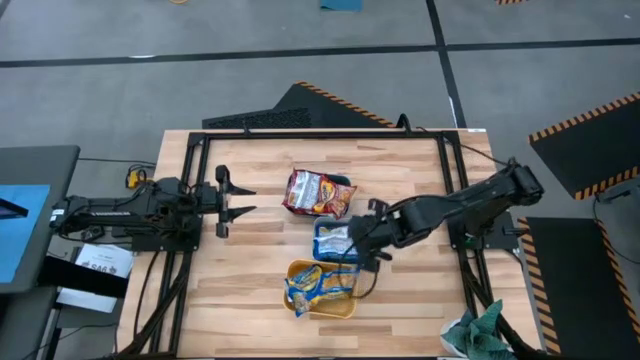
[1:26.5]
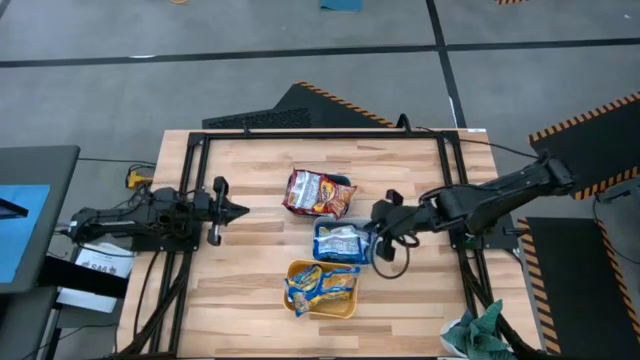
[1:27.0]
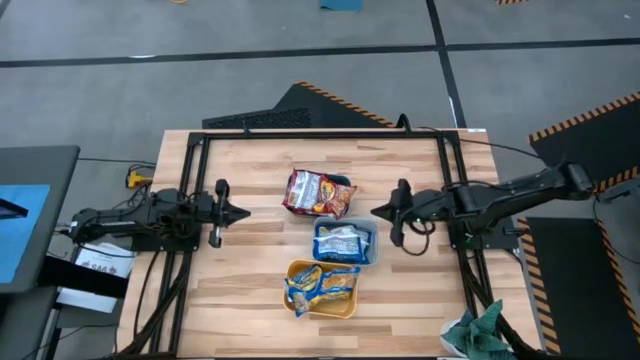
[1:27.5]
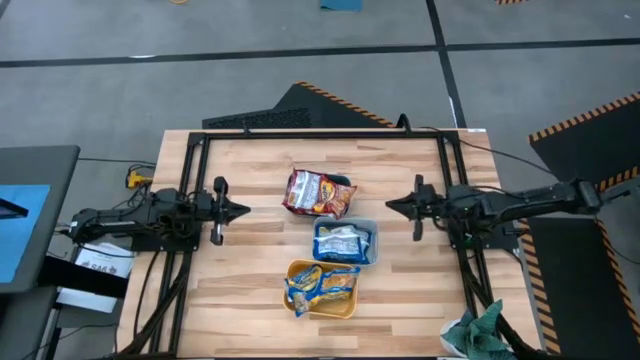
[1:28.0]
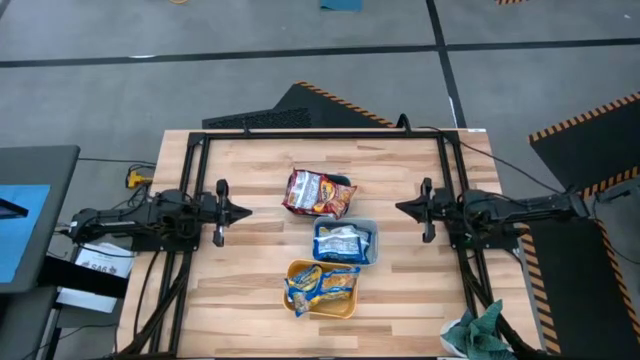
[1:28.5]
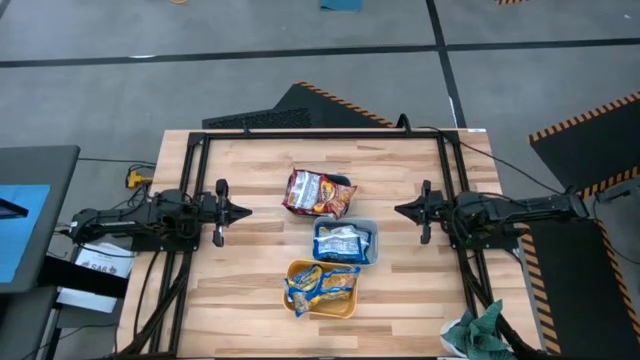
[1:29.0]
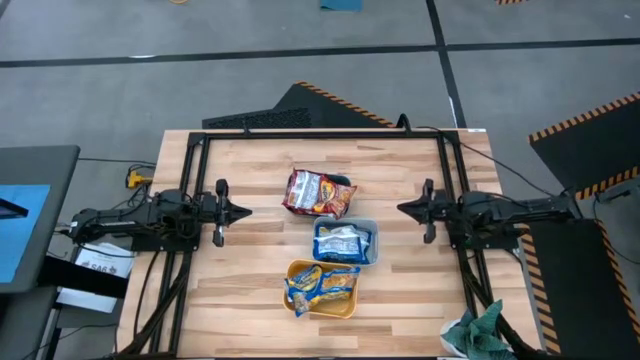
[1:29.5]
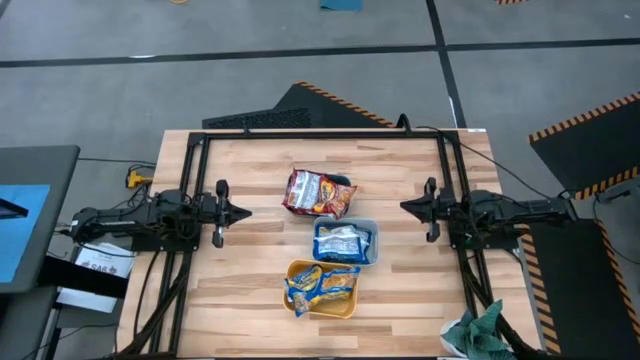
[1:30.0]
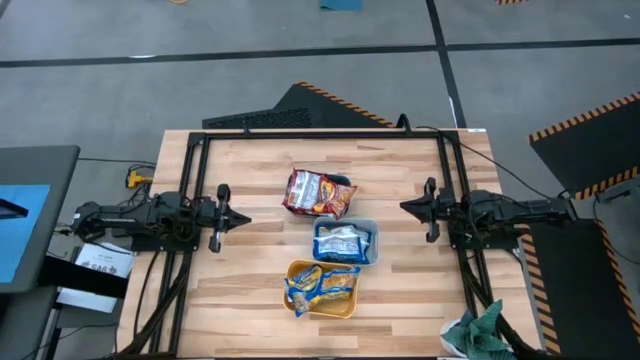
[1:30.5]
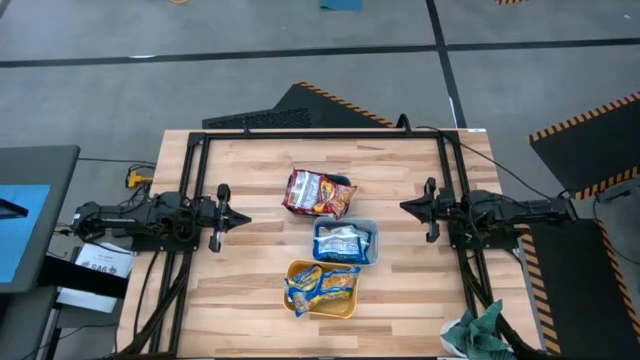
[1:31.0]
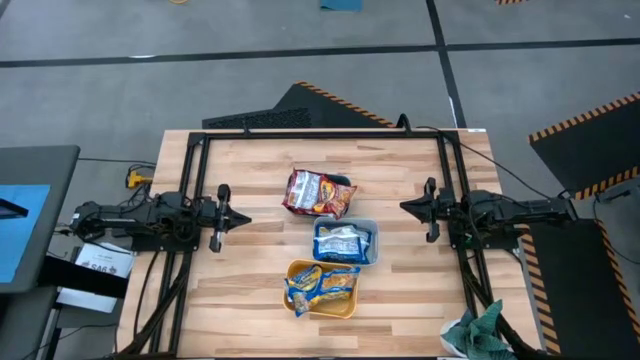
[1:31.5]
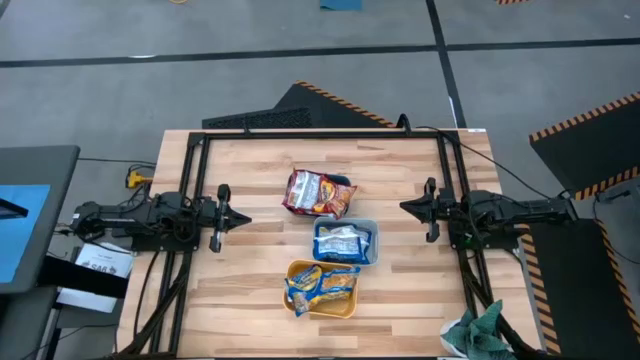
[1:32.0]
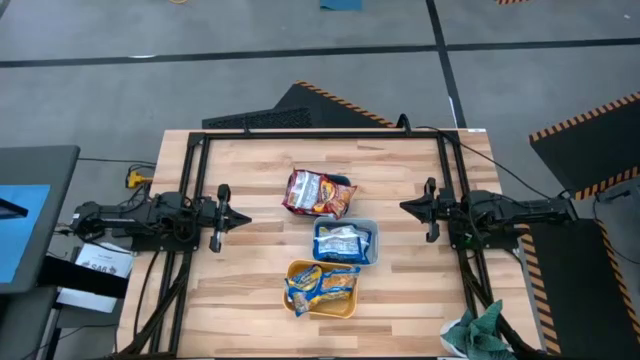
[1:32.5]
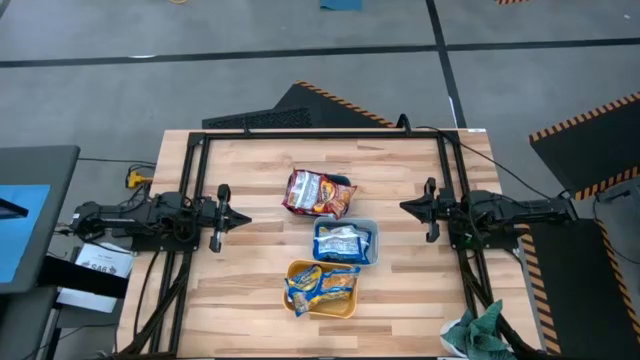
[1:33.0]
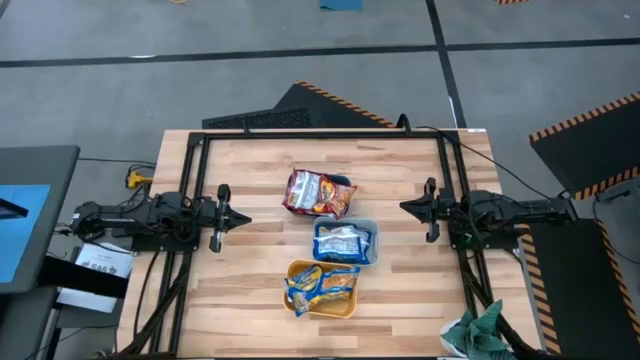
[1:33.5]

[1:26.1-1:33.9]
Task: Sort Maruchan noodles
Return to Home Position

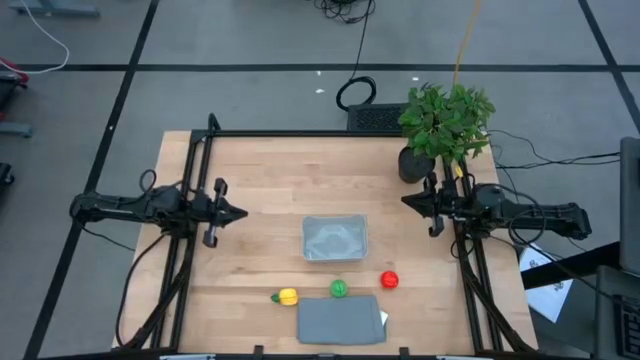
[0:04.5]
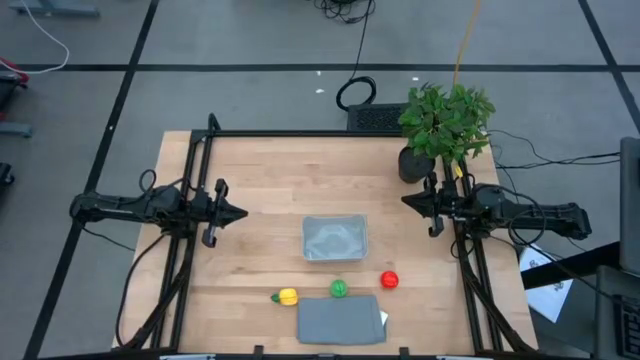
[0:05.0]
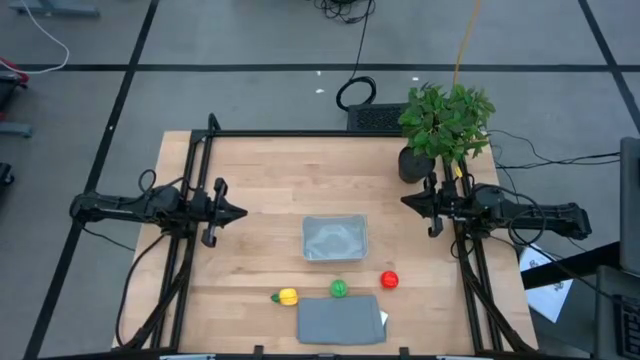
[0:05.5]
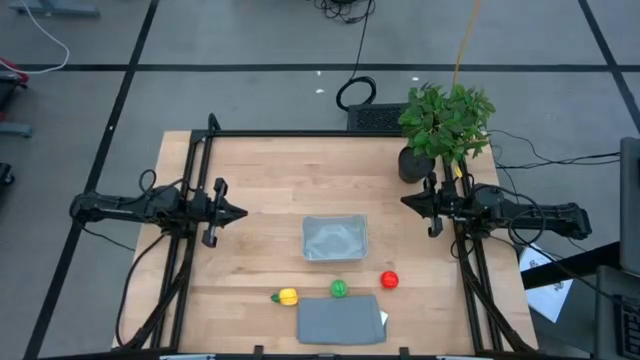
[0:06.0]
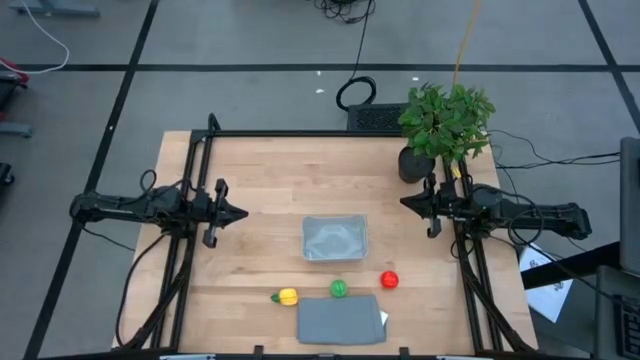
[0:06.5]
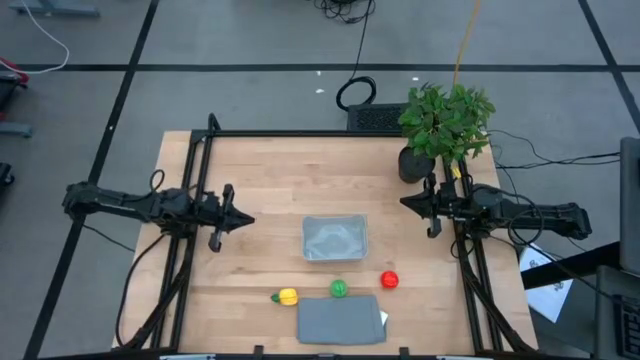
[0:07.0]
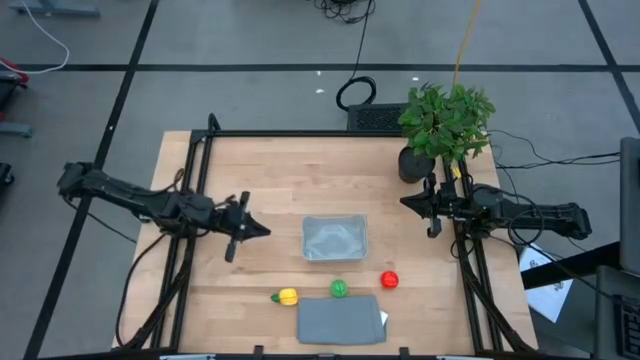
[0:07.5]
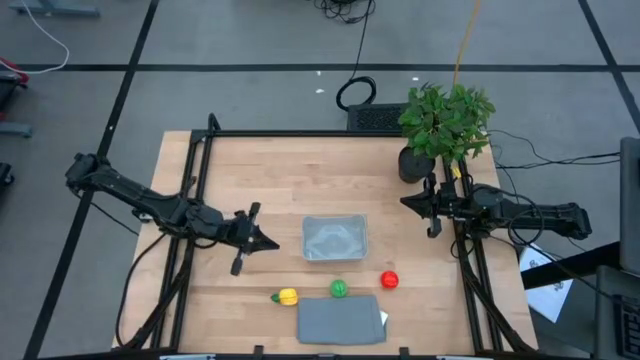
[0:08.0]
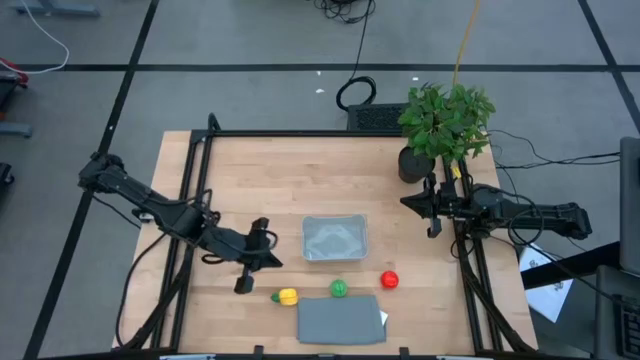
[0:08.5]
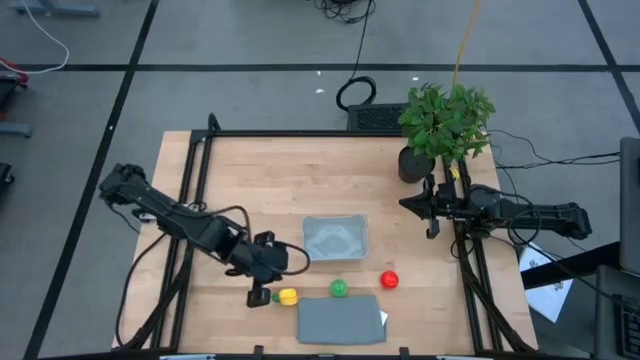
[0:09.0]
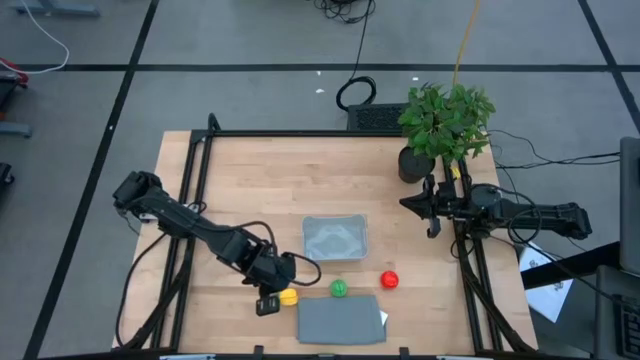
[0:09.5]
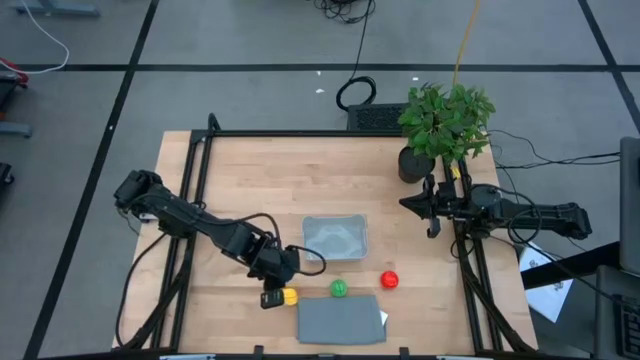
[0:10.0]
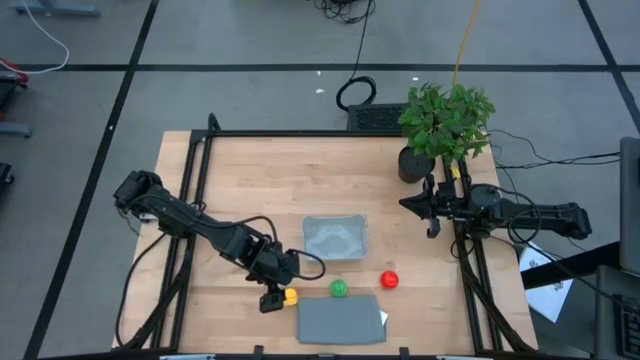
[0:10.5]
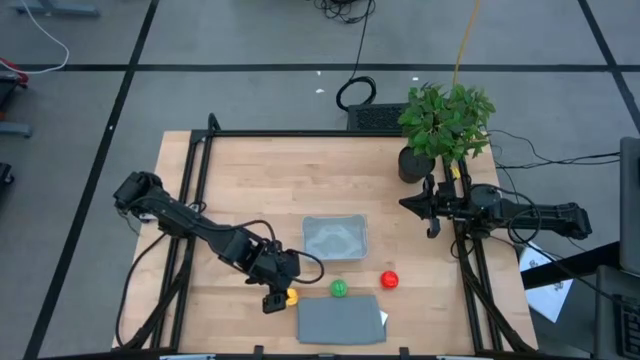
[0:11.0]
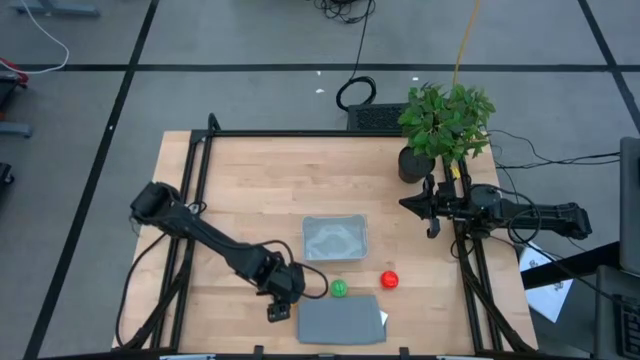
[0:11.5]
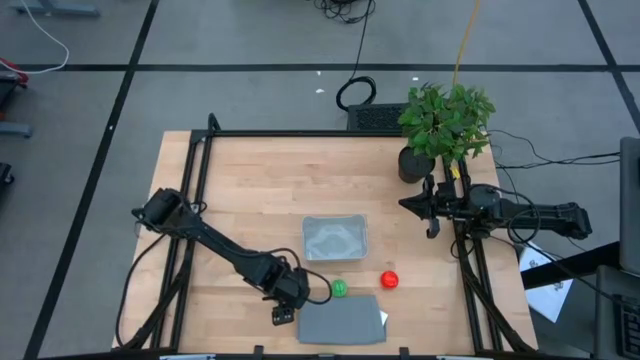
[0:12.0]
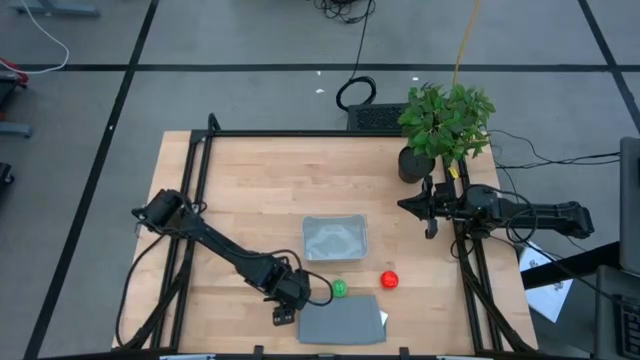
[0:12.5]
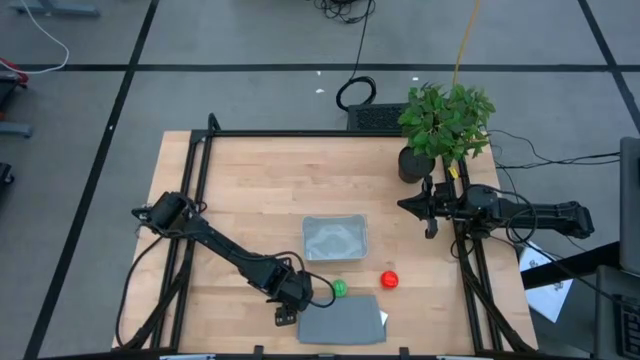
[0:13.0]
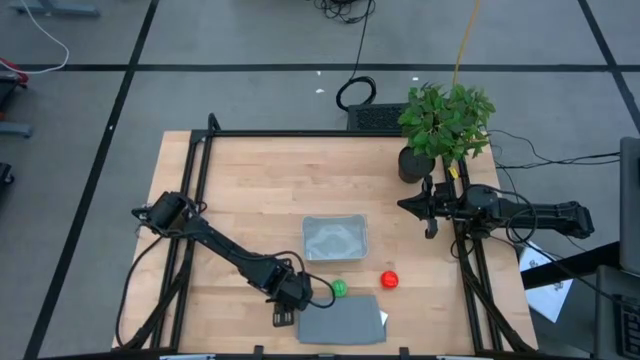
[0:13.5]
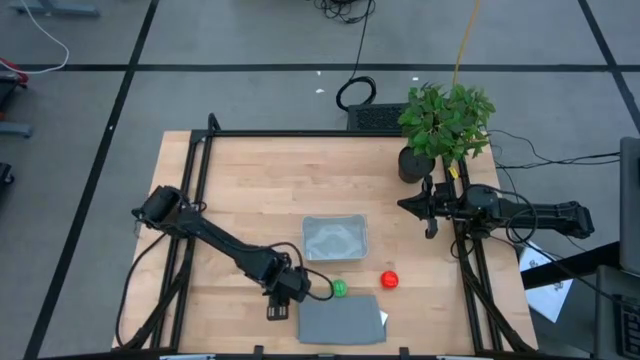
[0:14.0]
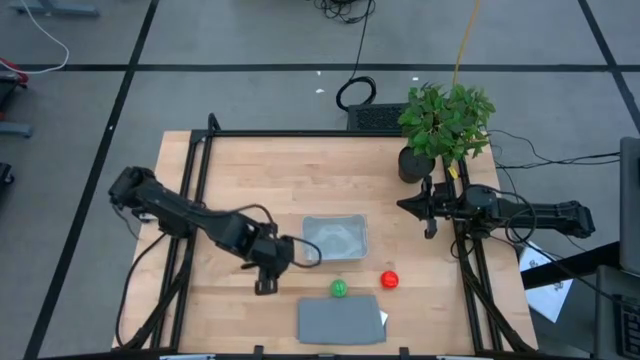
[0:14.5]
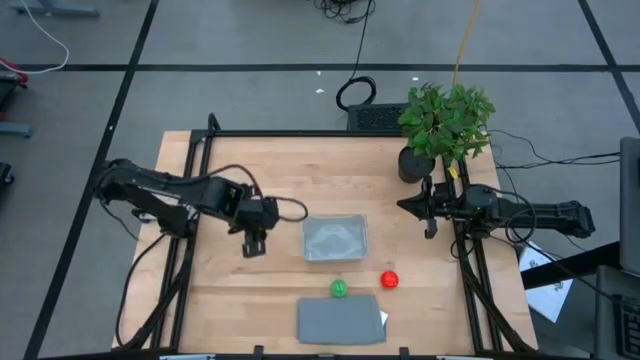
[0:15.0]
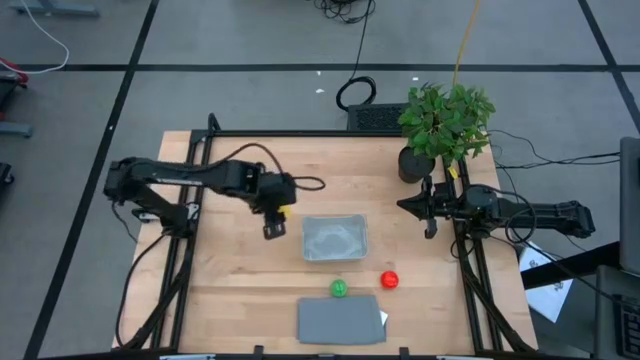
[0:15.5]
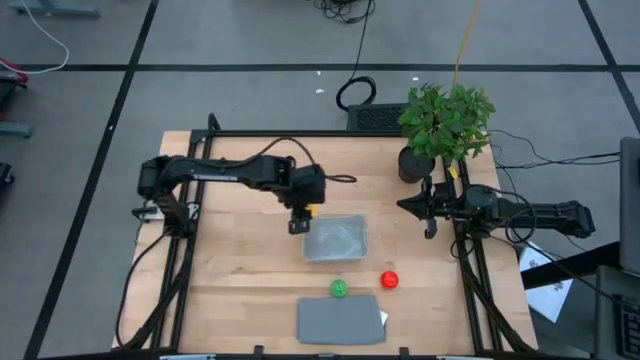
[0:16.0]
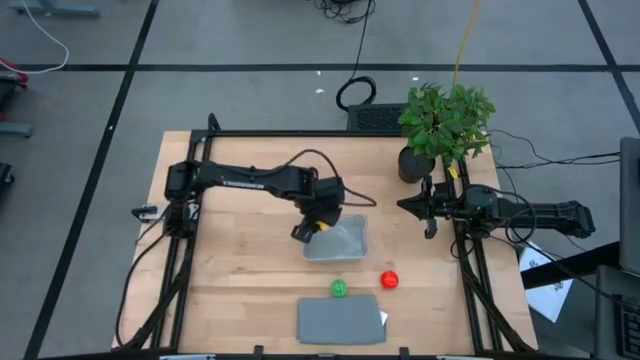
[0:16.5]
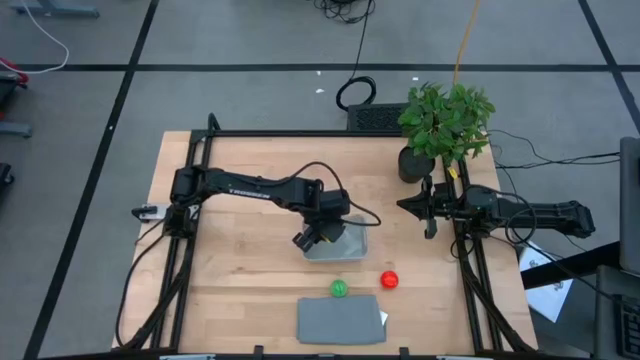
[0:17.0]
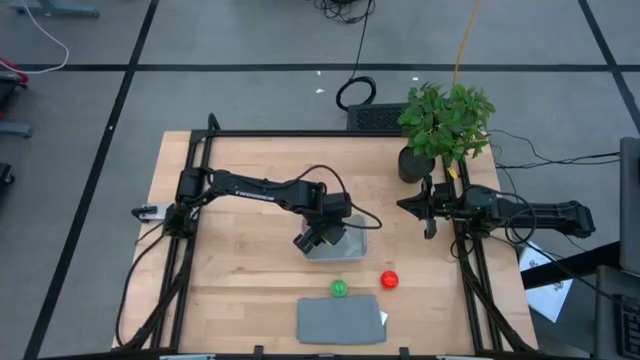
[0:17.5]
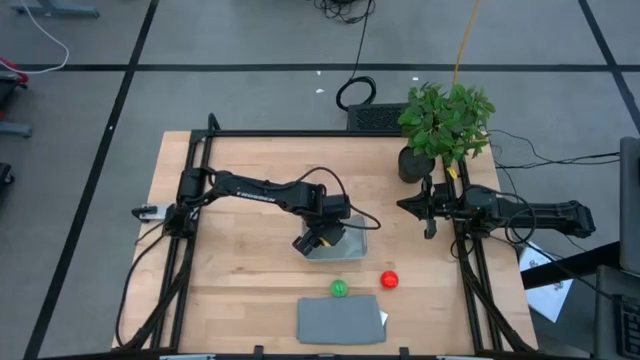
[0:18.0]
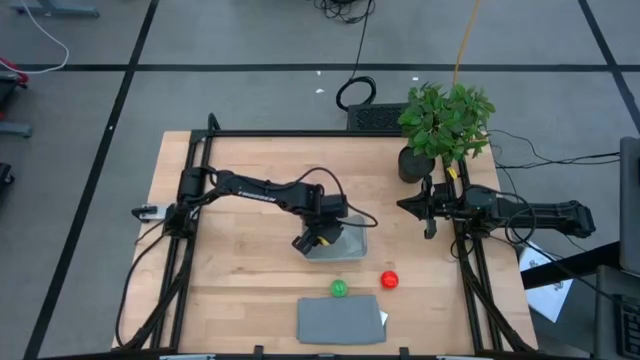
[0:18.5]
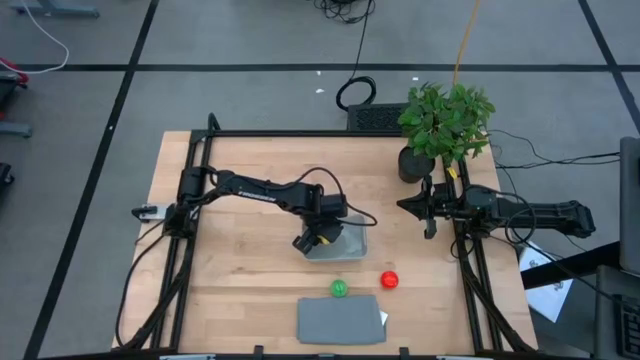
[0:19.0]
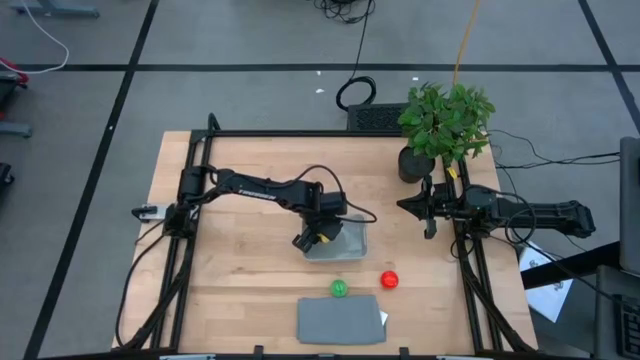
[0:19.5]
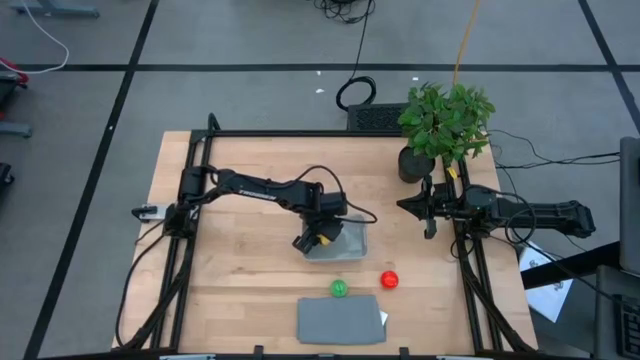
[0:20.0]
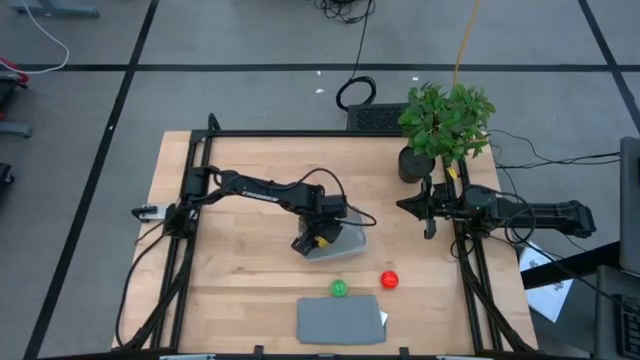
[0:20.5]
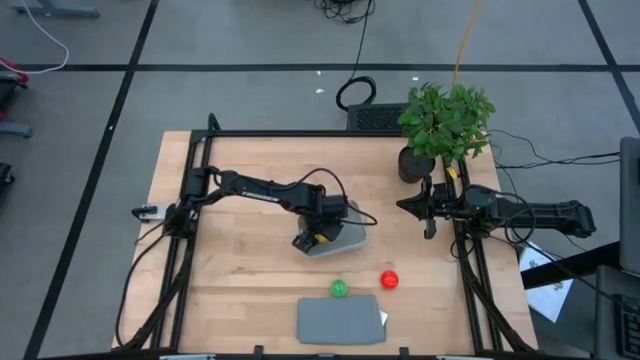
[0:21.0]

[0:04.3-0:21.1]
Task: Pick and placing Produce into tupperware
Put the yellow pineapple into the gray bin
